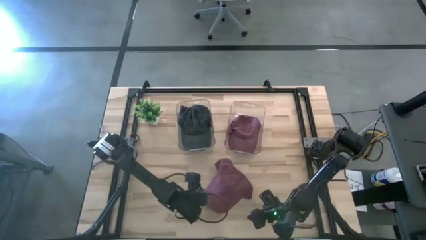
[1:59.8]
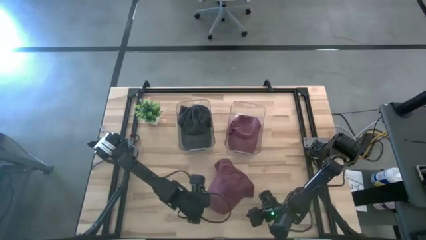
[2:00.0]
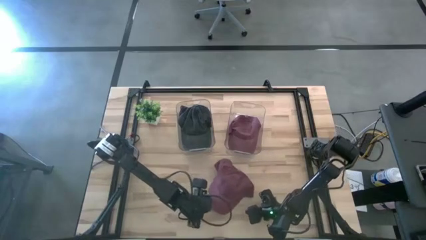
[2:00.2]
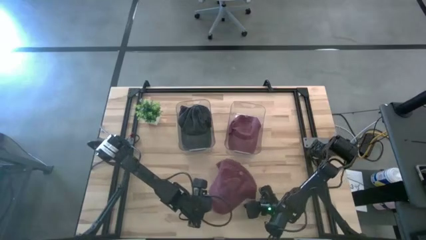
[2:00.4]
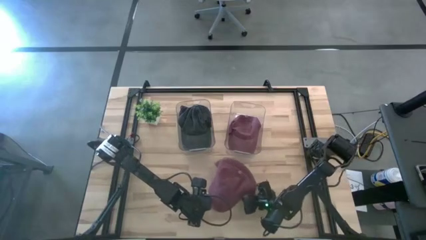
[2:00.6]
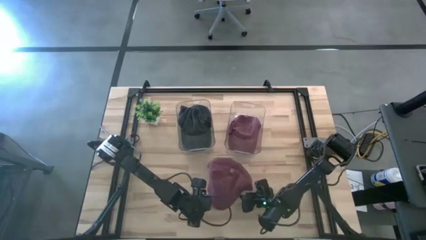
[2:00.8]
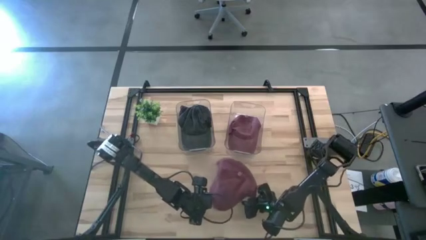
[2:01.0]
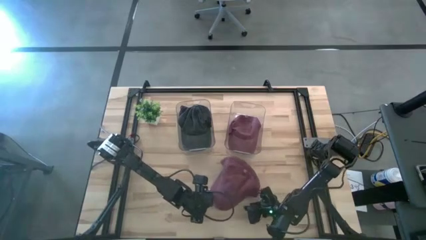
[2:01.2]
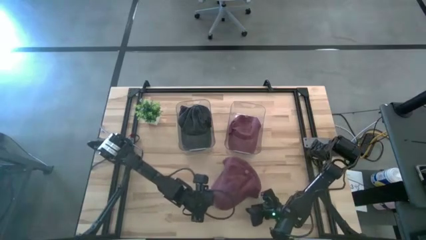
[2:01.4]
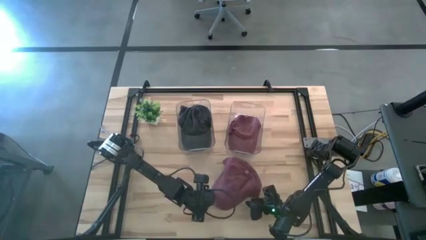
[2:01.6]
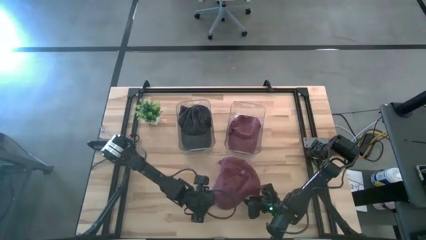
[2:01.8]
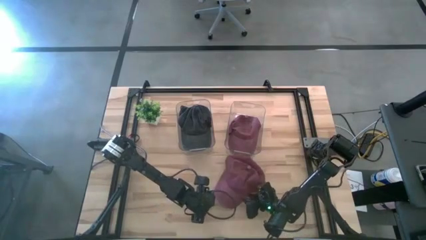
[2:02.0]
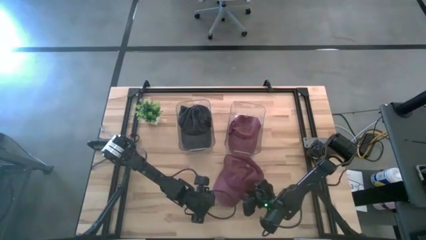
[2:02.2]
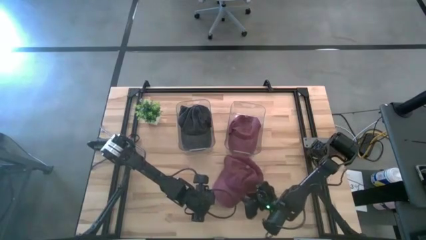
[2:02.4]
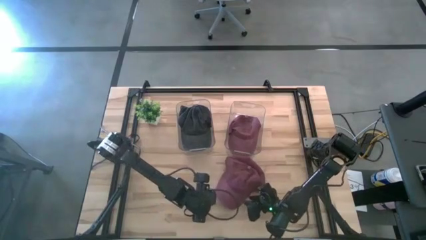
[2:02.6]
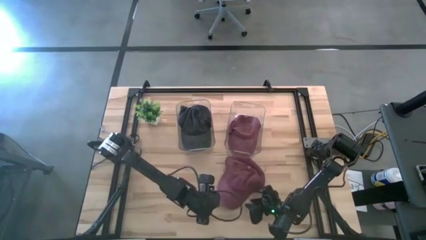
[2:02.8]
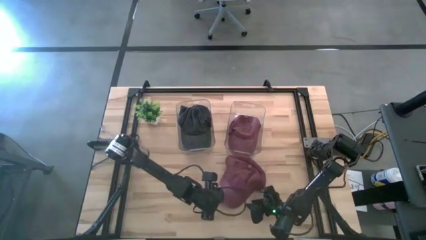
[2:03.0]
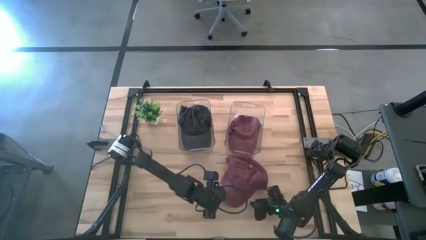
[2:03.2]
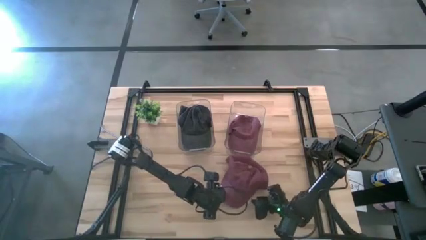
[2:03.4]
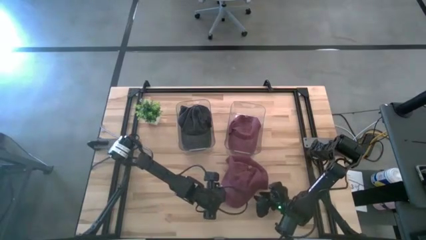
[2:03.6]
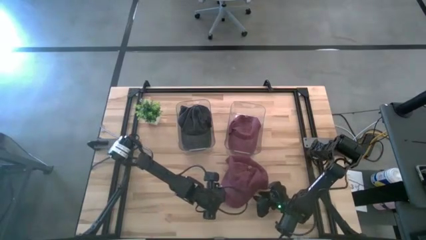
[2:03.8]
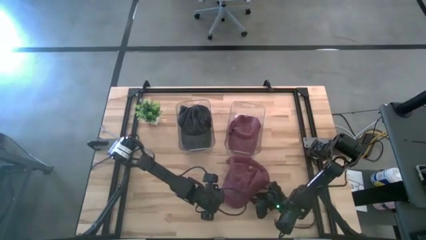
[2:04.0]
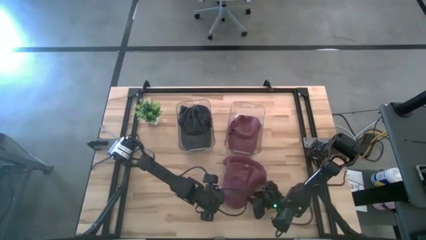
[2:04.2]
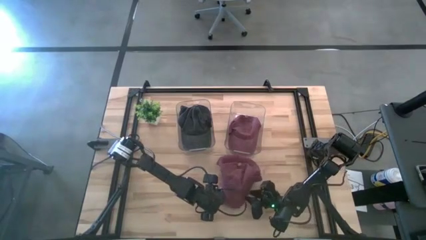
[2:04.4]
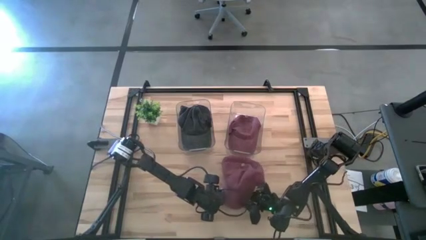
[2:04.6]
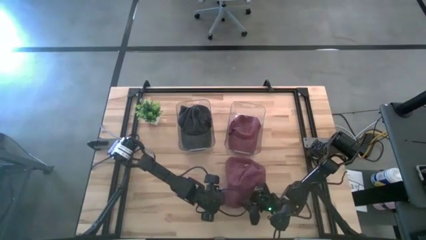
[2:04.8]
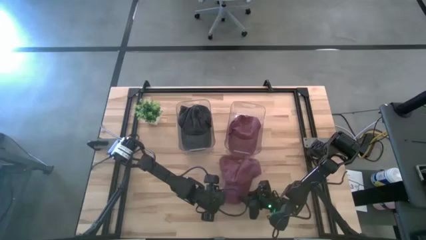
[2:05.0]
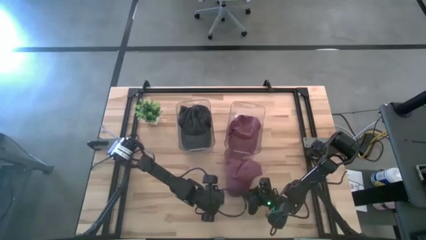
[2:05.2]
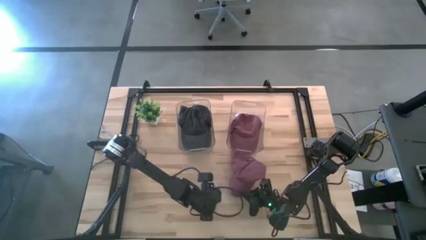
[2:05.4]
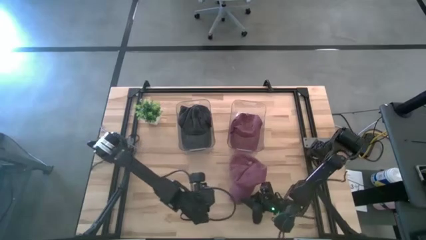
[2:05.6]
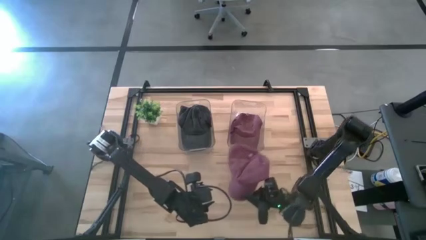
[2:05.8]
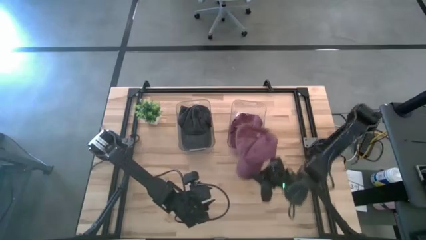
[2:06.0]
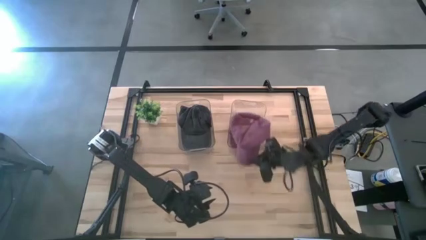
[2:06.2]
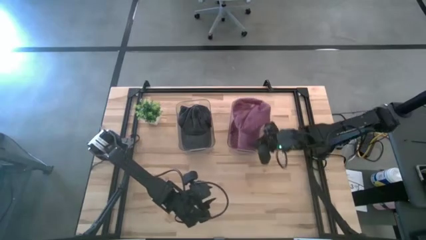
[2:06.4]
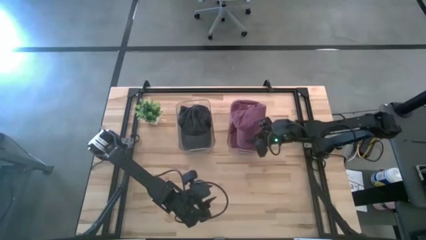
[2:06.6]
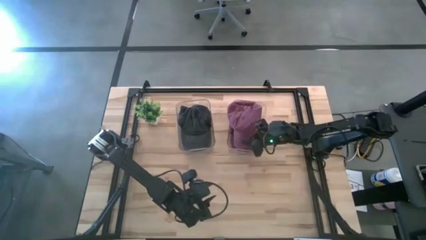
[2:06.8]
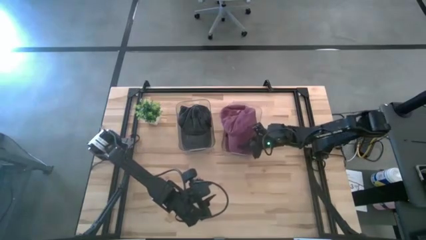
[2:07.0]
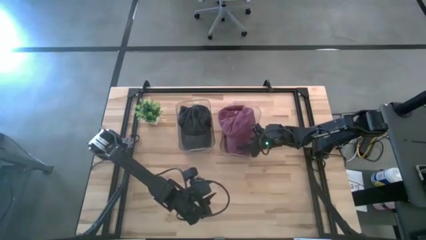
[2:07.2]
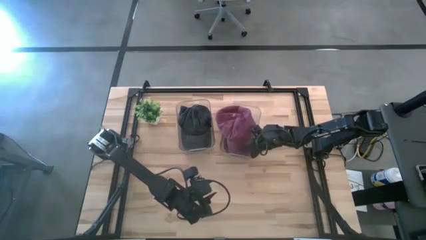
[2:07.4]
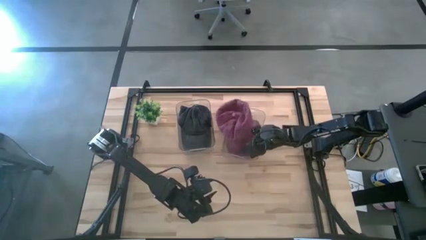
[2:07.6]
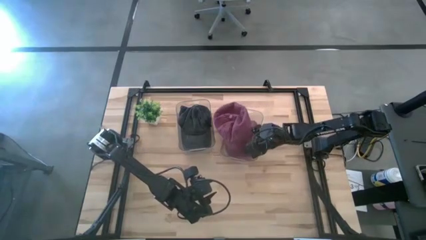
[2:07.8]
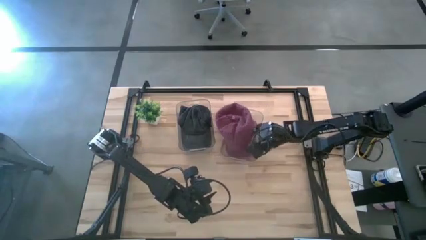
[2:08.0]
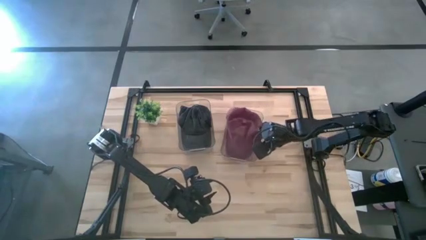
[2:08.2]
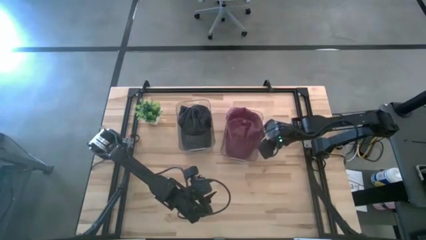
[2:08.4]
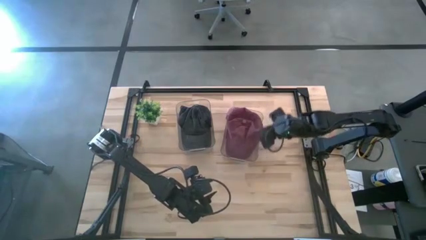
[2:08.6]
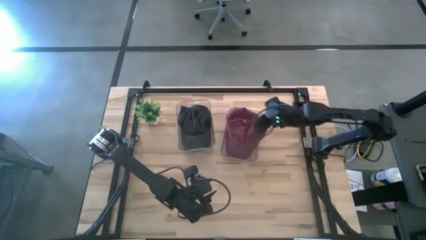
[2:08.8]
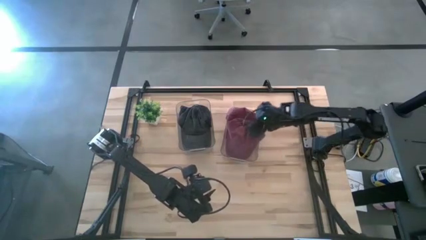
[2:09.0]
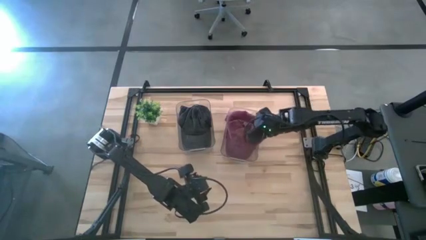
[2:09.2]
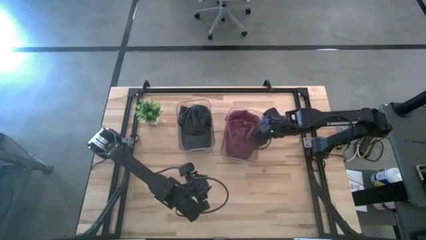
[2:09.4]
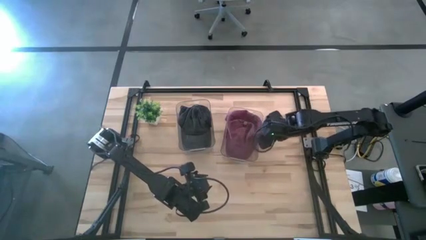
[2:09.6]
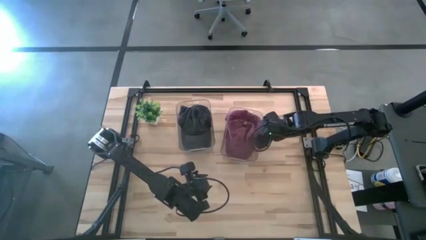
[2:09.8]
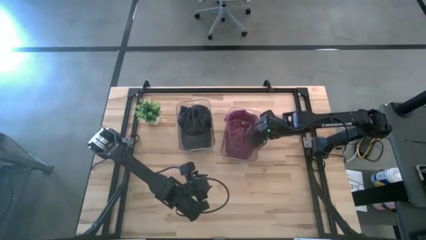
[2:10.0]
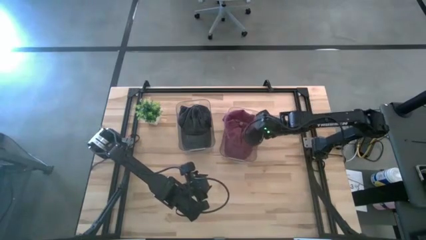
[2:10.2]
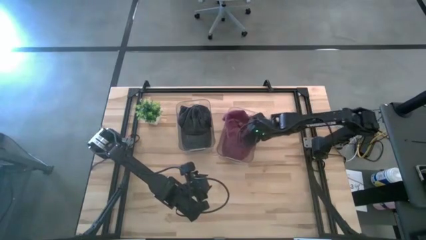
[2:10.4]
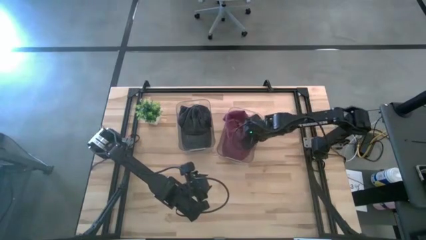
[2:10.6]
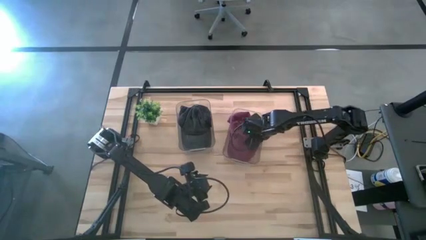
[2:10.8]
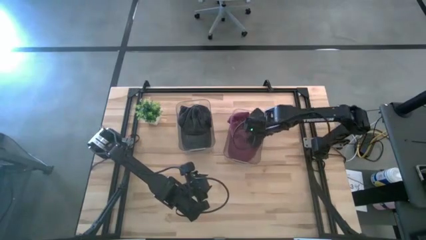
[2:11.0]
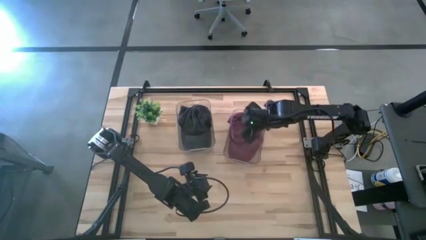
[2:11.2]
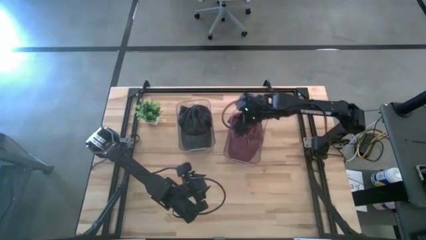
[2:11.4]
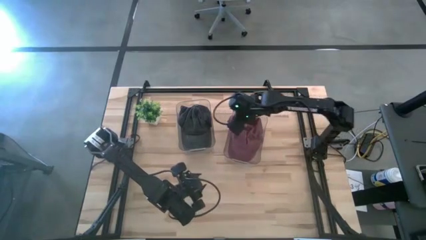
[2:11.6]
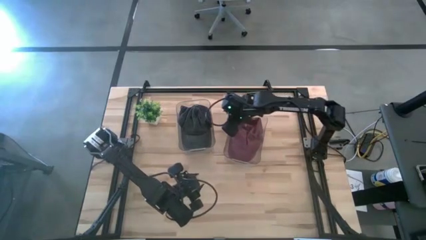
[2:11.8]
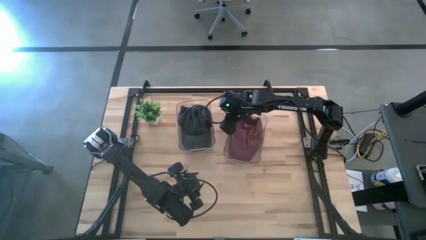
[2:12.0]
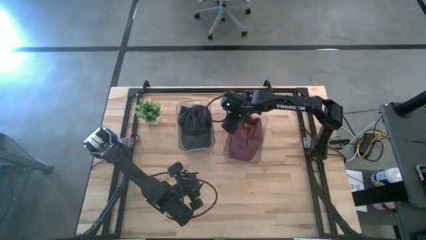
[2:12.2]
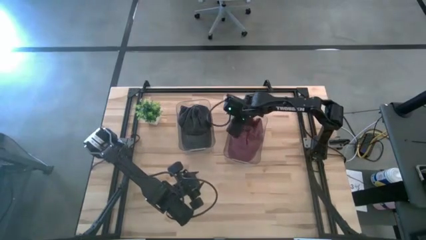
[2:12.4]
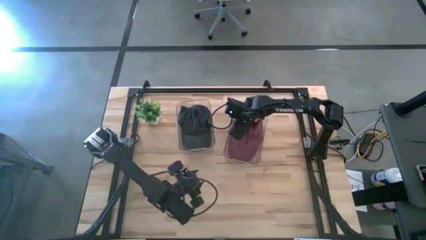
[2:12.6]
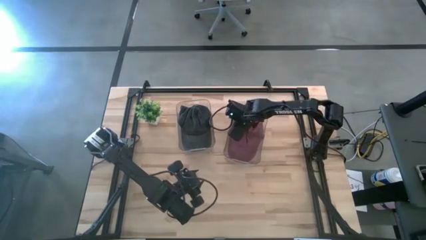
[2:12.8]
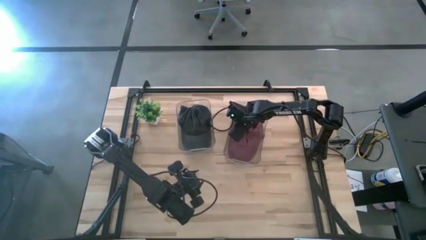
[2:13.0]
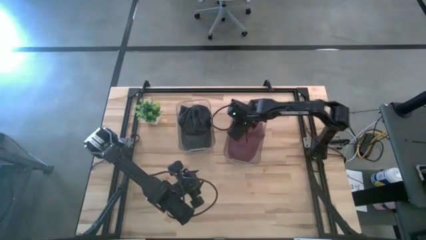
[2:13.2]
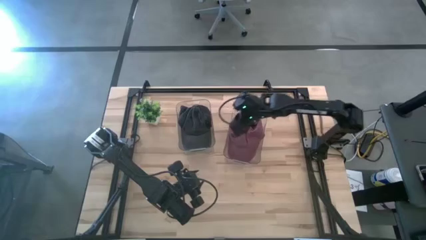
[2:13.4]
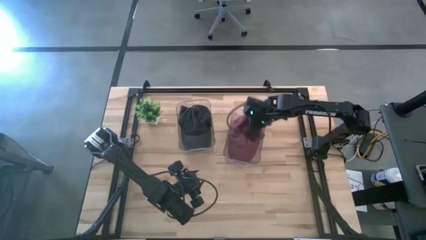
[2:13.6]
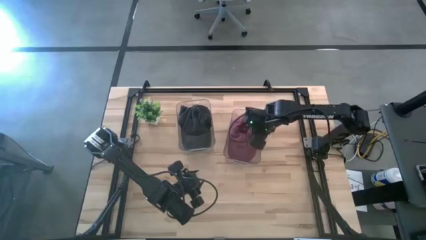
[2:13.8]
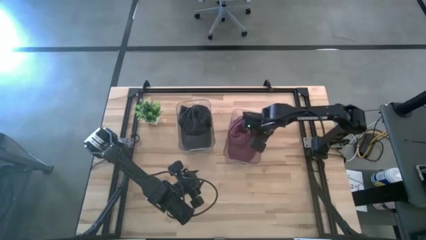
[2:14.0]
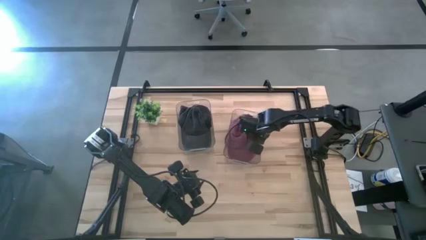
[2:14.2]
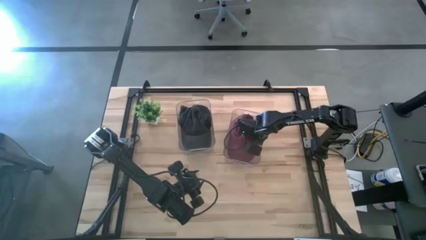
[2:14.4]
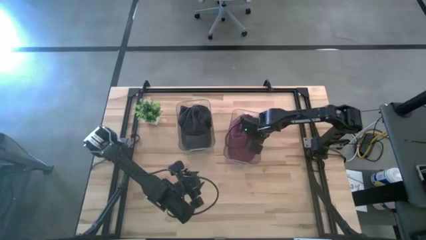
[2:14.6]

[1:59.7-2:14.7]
Task: Pick & Place hat
Put the red cap into the right transparent bin
